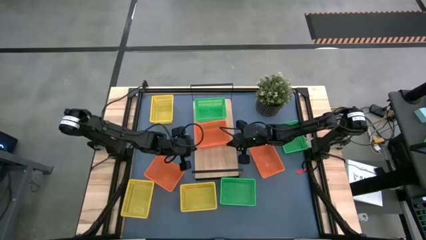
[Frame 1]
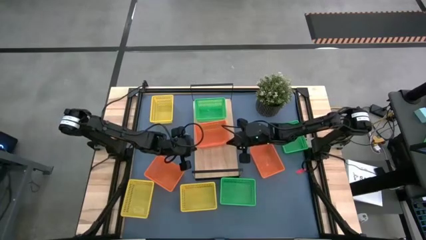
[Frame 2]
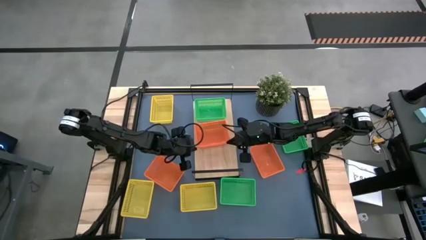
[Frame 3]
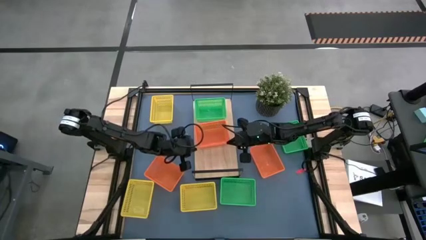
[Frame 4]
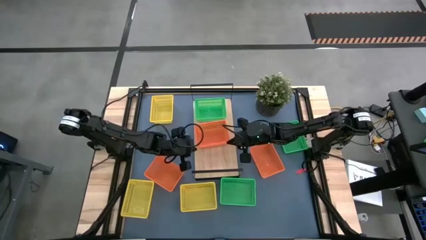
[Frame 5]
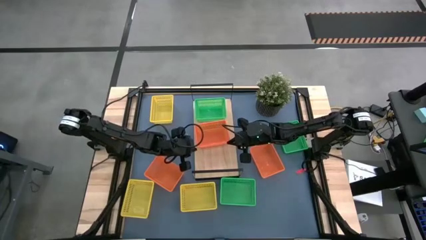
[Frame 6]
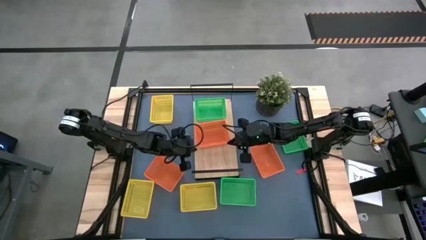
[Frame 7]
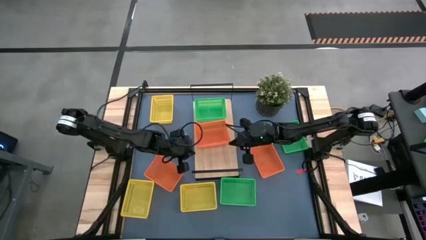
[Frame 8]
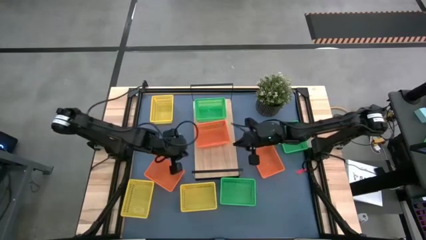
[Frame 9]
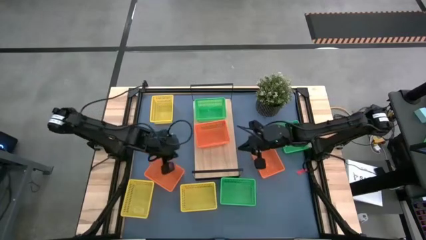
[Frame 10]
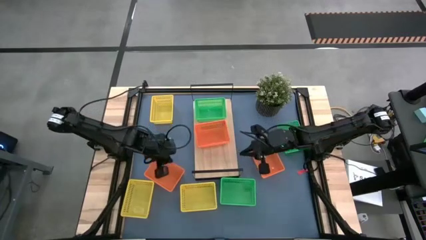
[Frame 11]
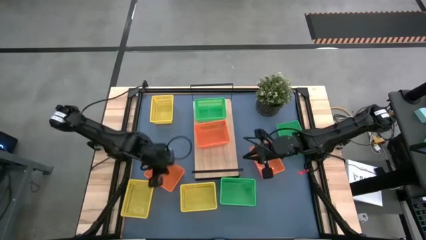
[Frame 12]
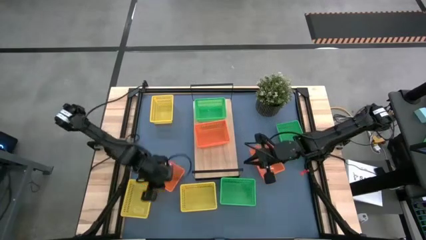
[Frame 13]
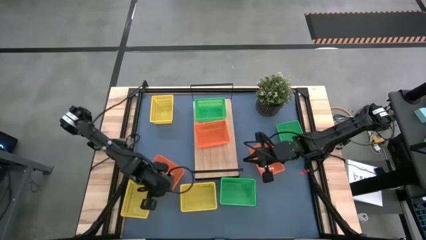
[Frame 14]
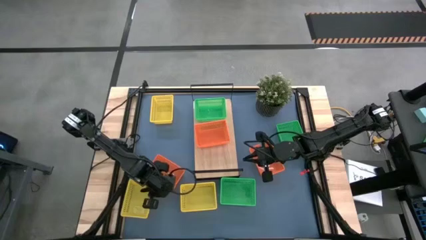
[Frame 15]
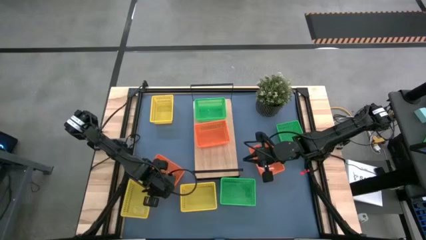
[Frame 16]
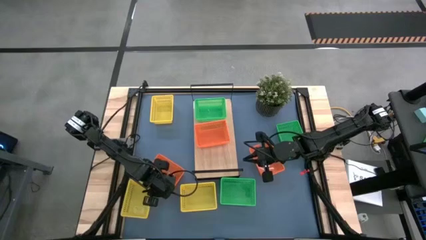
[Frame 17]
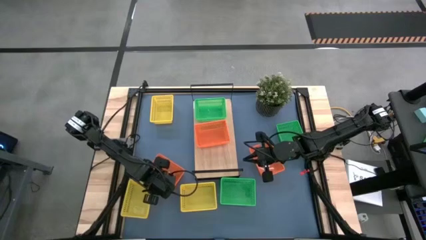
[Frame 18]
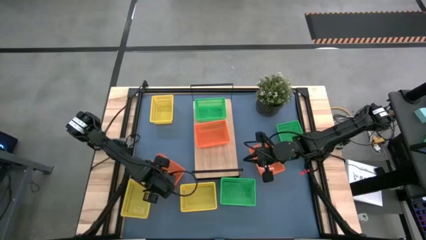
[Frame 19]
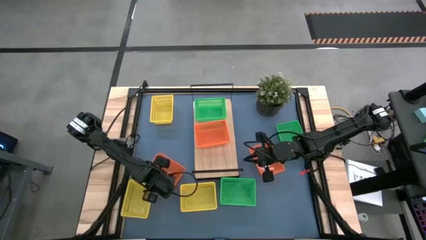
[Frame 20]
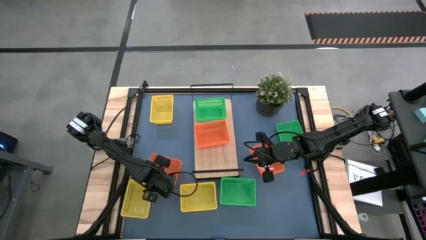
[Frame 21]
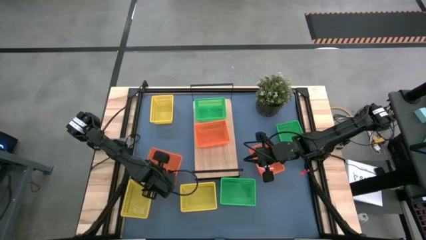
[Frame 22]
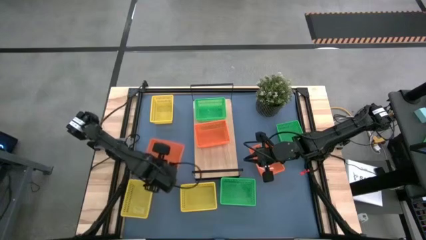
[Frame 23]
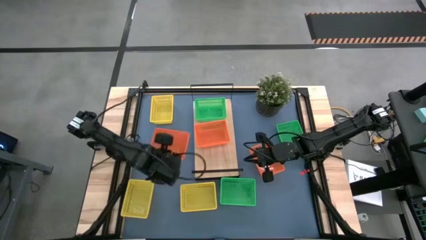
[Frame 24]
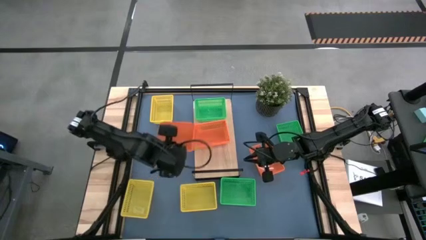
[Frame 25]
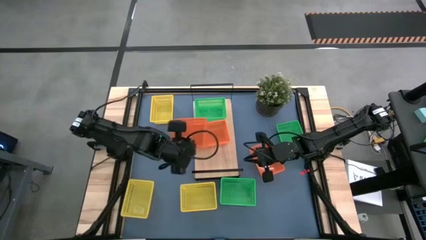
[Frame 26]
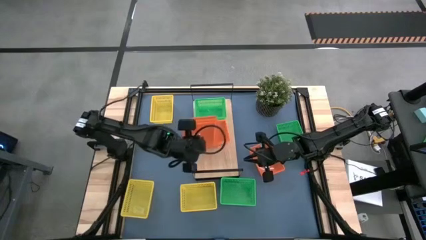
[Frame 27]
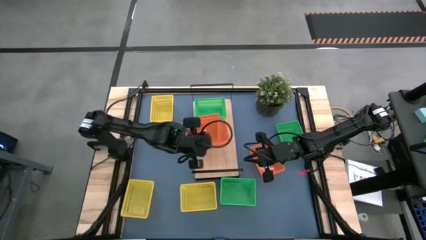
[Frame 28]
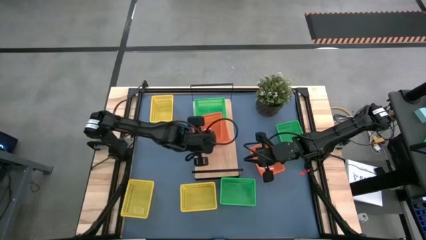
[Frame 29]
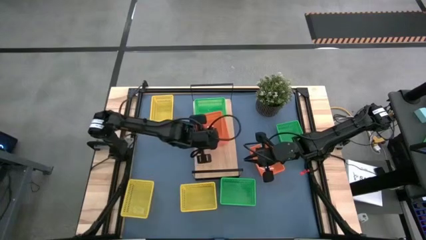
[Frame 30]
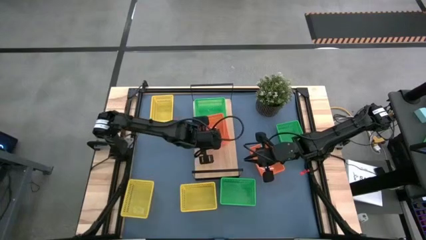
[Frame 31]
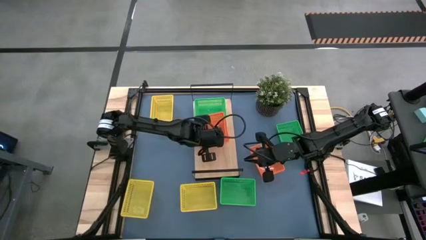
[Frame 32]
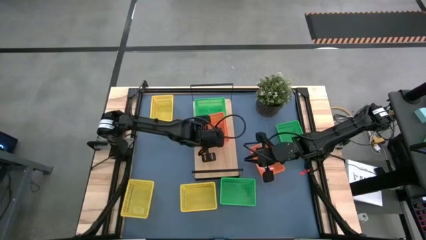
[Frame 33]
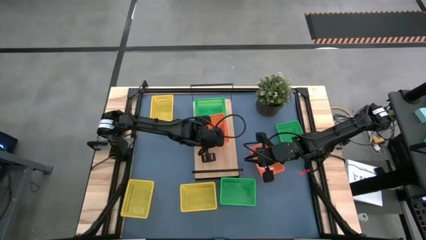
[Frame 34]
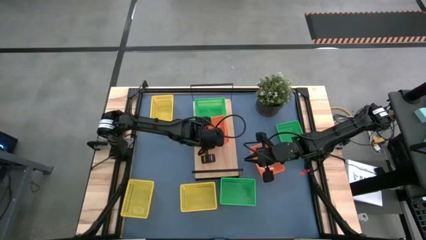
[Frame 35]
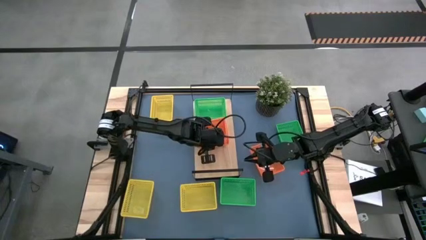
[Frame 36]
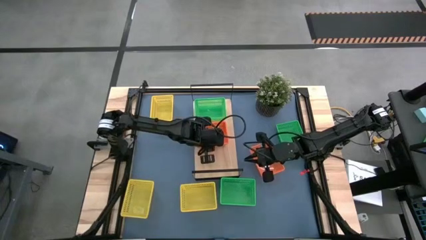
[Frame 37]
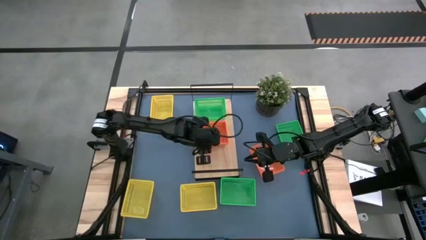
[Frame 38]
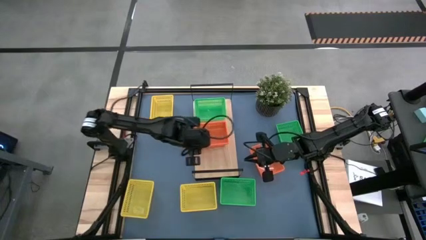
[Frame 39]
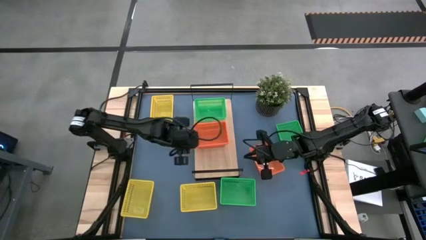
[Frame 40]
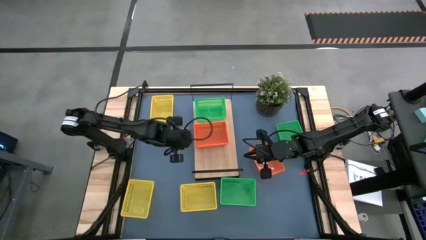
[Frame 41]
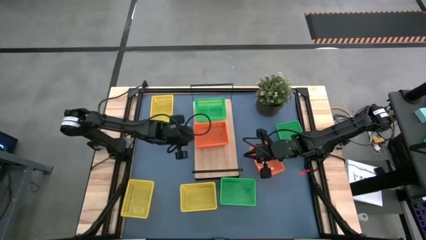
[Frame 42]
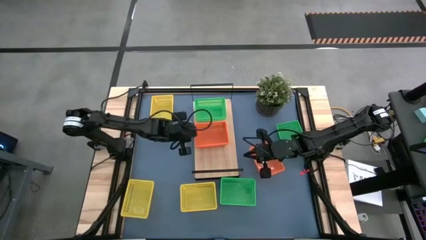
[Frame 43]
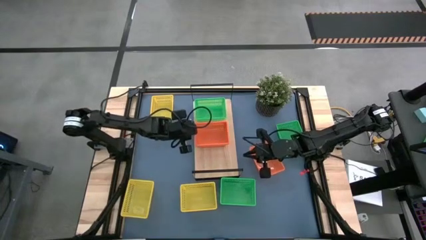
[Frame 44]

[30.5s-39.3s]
Task: Stack baskets on shelf by color
Stack the left orange bin on top of the orange bin on the shelf
